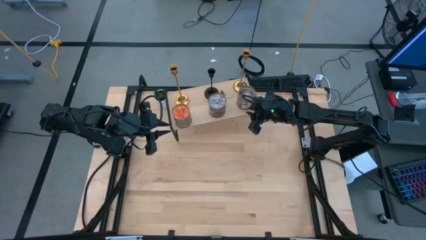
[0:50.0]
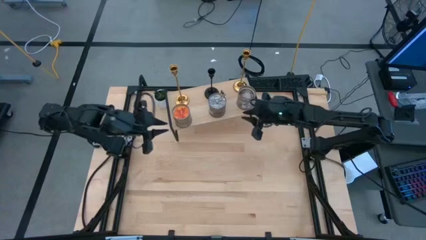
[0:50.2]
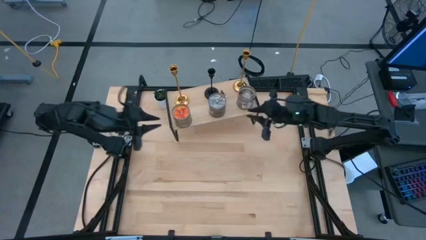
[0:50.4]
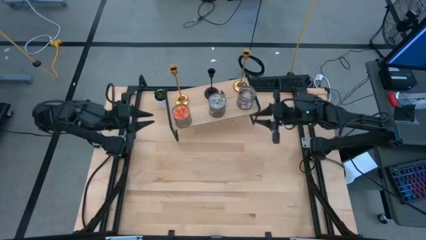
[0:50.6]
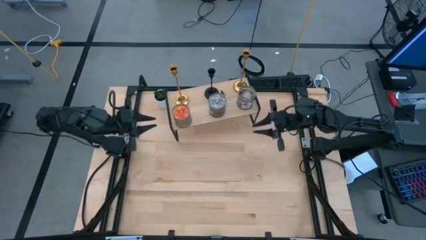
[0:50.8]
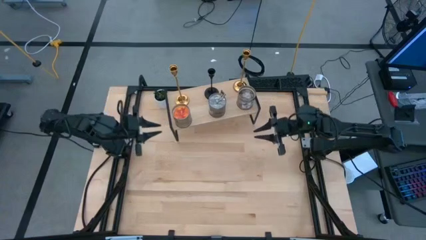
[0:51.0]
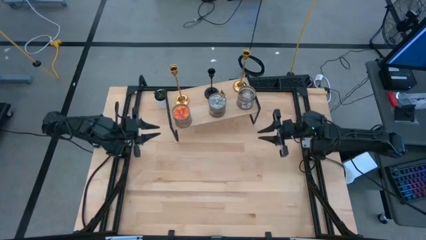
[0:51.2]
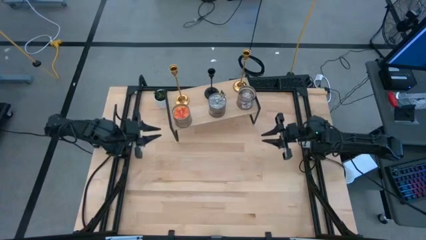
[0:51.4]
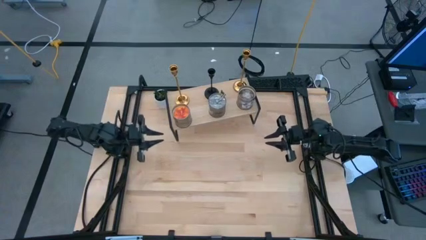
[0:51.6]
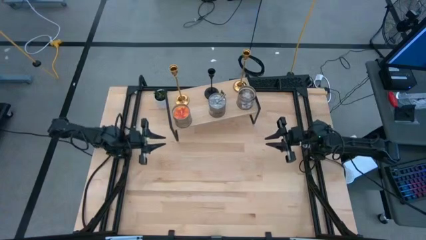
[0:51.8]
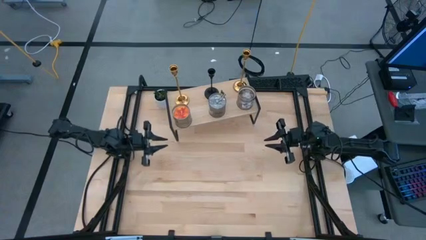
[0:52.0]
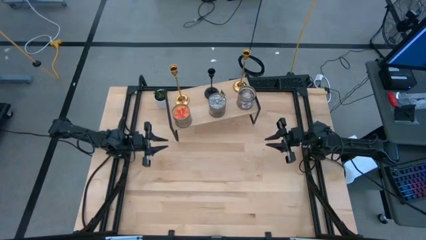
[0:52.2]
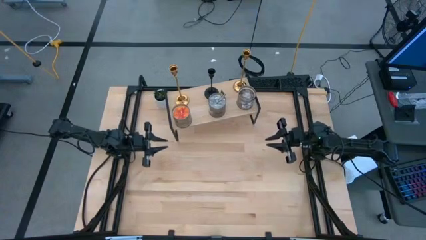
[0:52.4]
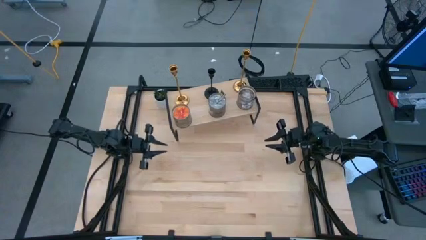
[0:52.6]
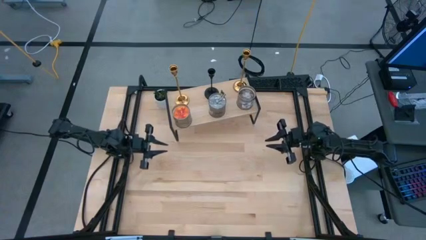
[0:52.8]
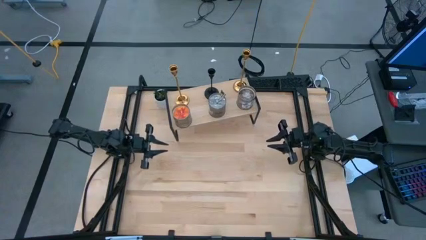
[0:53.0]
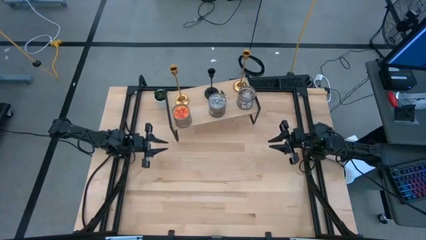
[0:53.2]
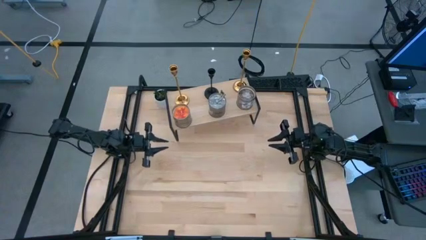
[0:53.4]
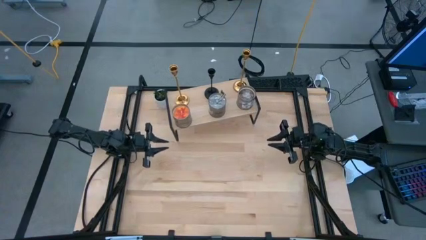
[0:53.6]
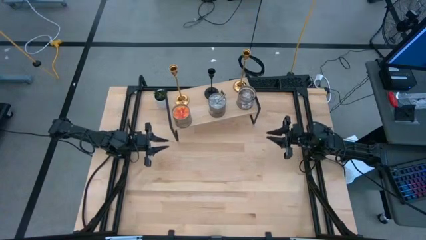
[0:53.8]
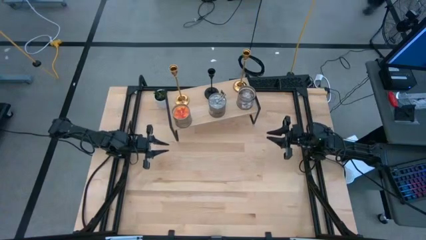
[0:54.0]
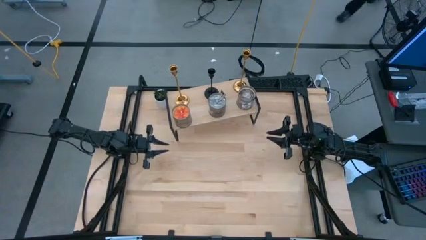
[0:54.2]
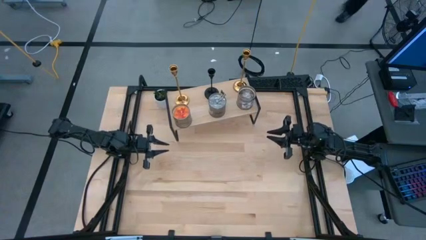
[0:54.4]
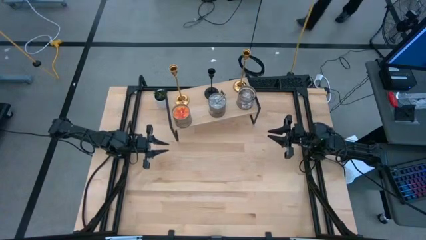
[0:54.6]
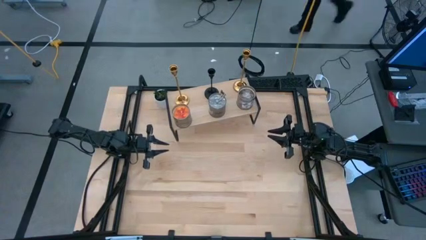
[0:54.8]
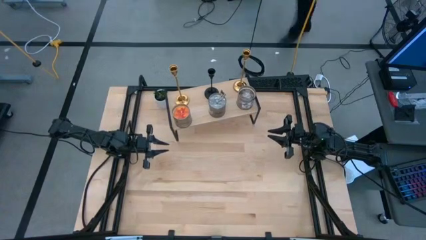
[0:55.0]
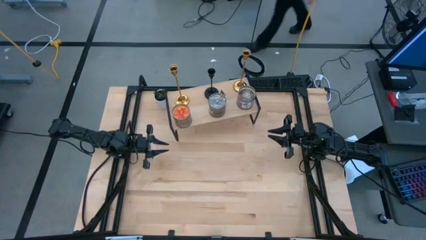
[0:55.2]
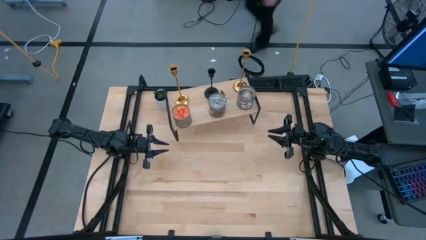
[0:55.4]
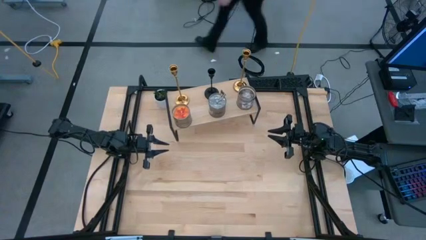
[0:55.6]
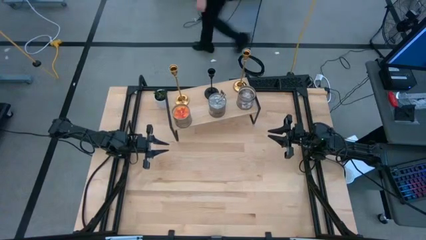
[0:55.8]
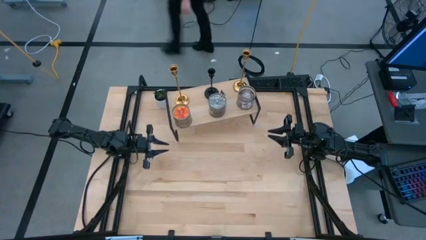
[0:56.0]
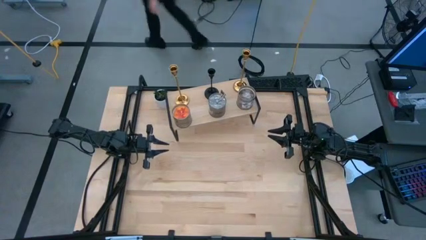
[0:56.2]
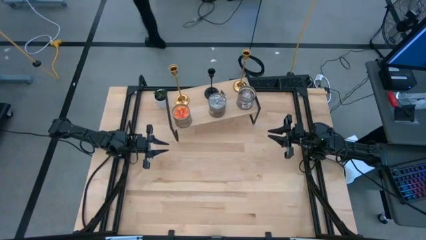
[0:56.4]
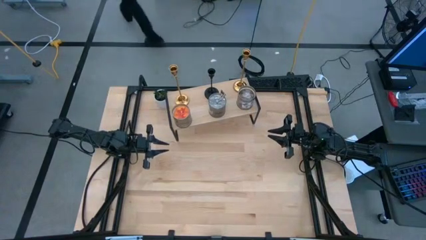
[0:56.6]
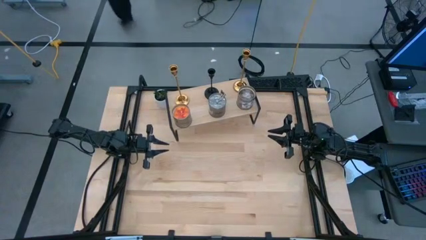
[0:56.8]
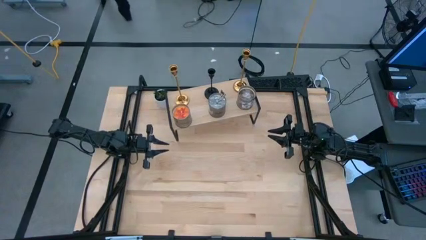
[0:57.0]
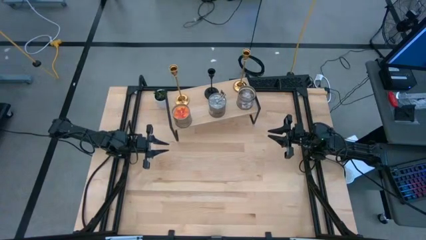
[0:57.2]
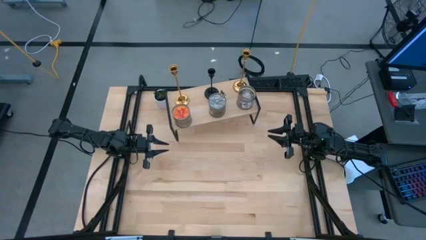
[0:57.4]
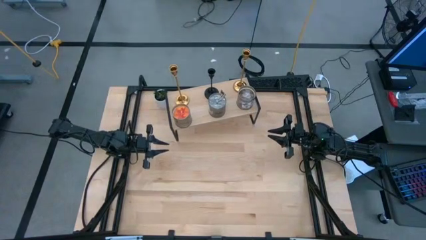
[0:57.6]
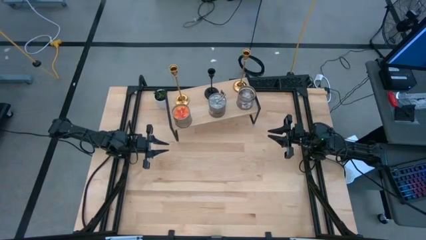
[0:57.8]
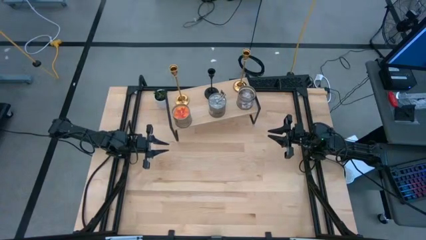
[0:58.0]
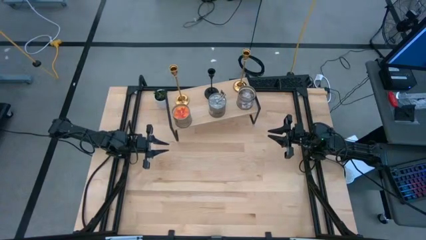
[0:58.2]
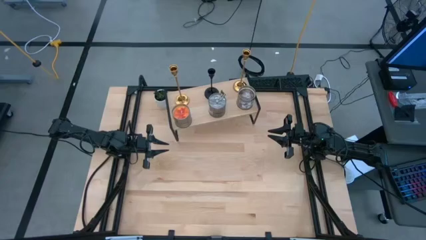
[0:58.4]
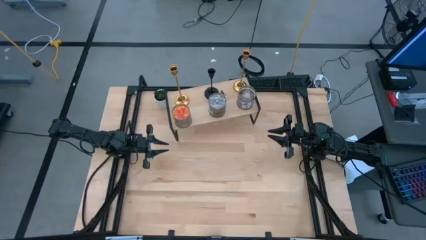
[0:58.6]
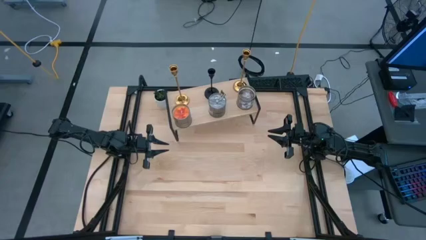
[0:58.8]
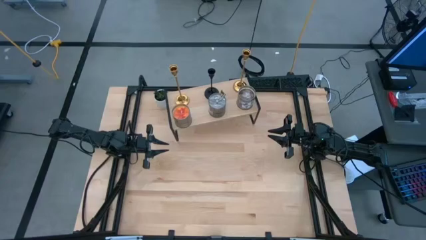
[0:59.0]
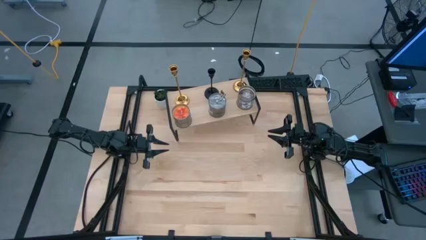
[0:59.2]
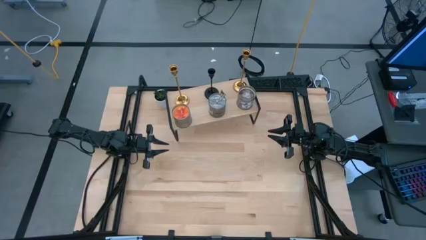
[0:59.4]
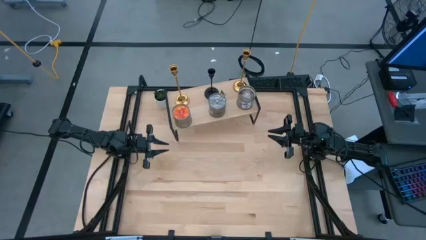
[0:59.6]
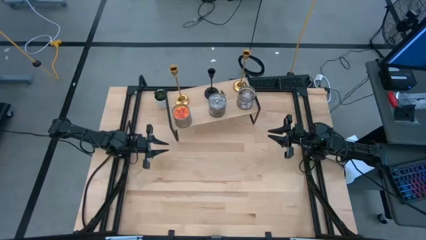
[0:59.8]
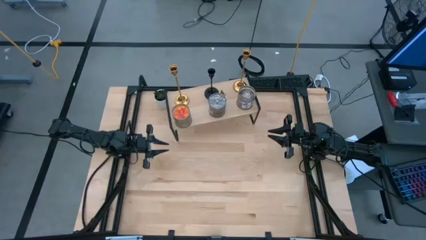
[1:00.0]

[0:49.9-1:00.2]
Task: Pick & Place candle stick holders
Return to Home Position

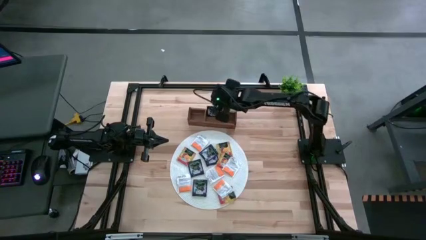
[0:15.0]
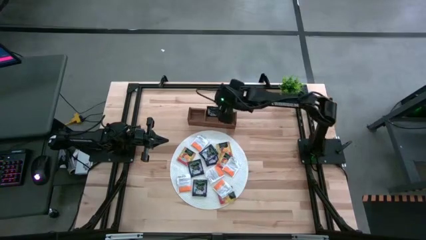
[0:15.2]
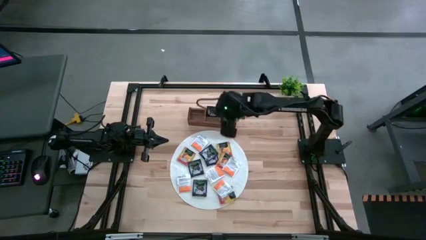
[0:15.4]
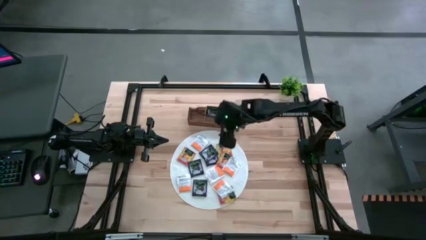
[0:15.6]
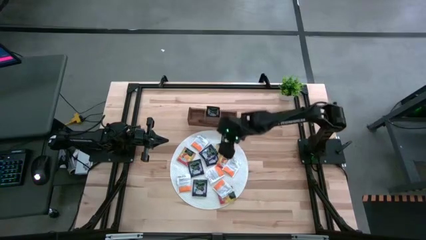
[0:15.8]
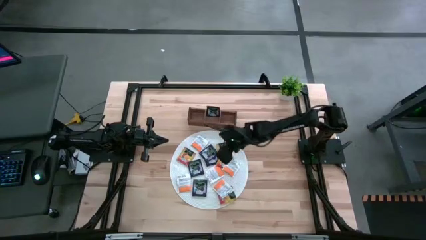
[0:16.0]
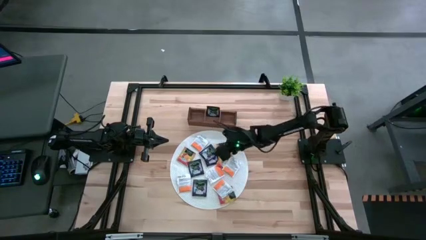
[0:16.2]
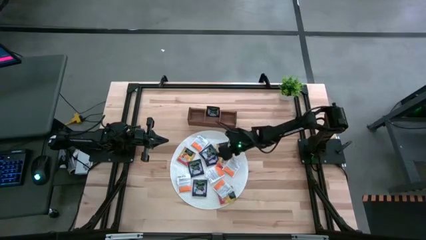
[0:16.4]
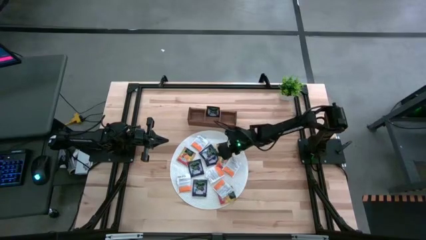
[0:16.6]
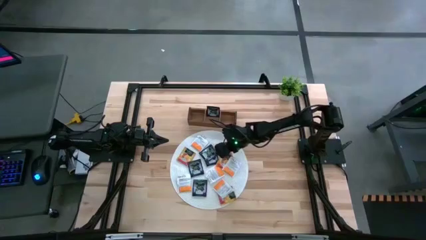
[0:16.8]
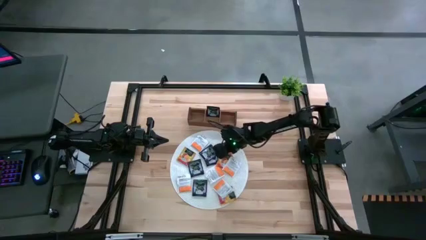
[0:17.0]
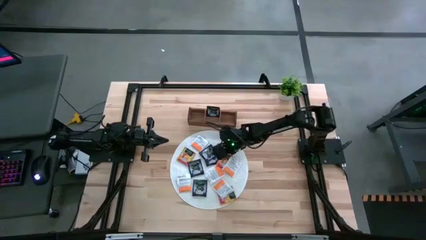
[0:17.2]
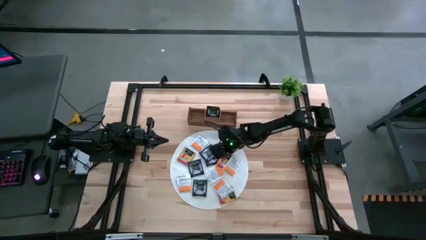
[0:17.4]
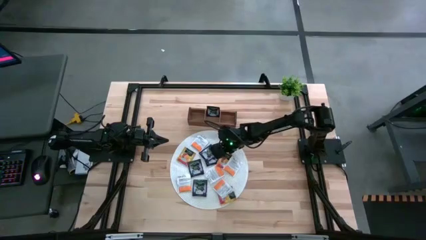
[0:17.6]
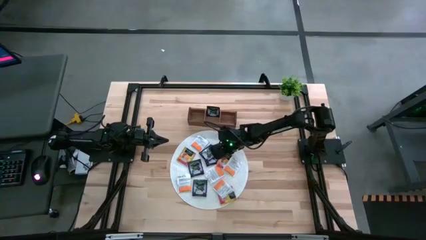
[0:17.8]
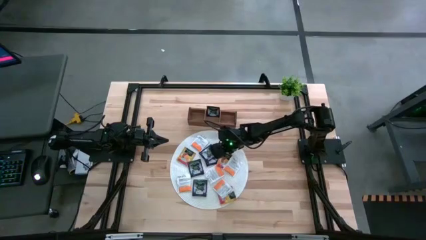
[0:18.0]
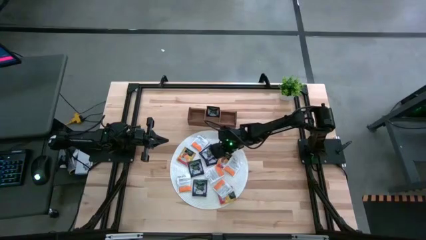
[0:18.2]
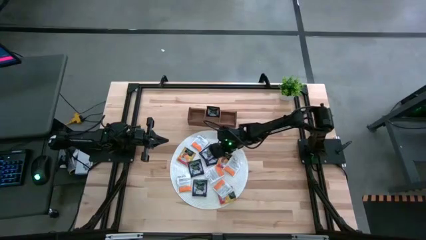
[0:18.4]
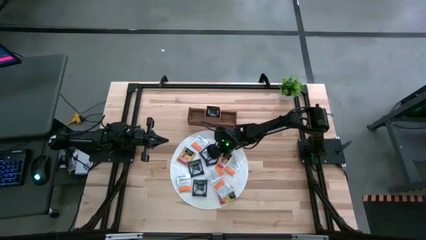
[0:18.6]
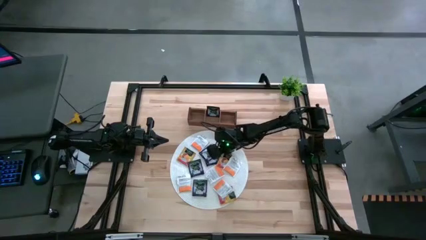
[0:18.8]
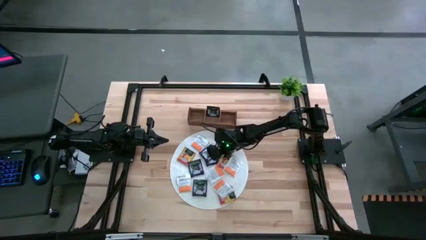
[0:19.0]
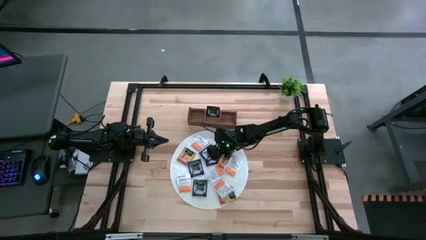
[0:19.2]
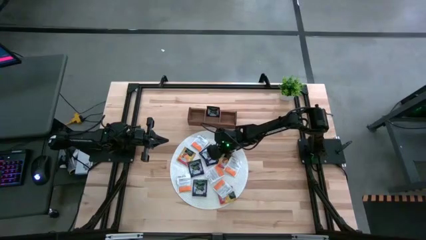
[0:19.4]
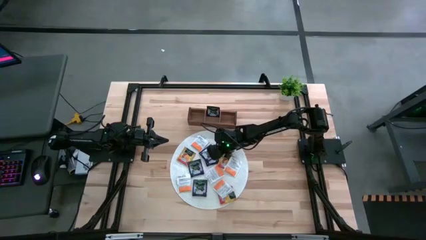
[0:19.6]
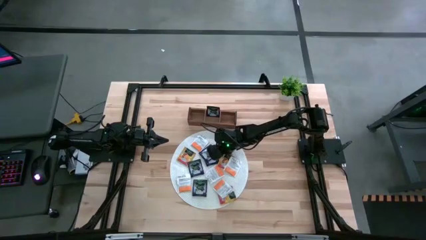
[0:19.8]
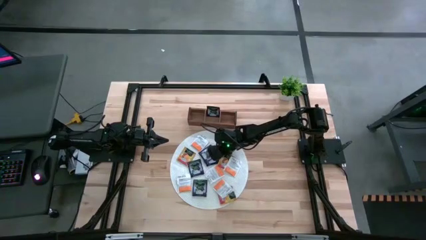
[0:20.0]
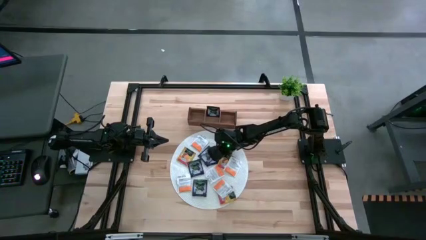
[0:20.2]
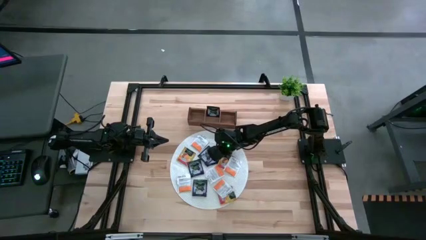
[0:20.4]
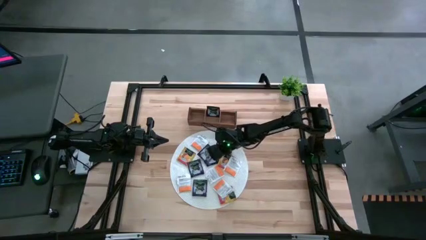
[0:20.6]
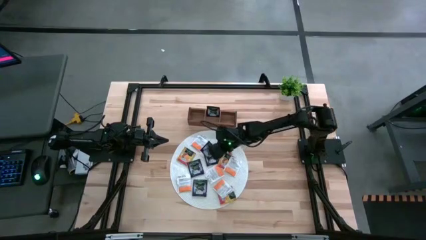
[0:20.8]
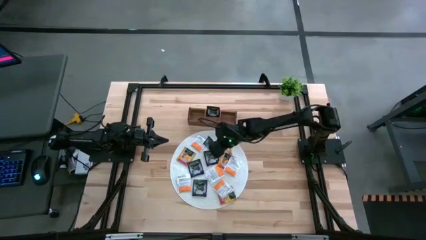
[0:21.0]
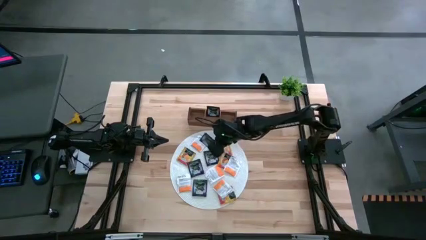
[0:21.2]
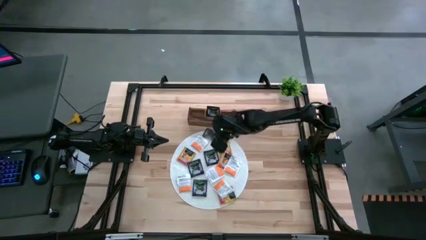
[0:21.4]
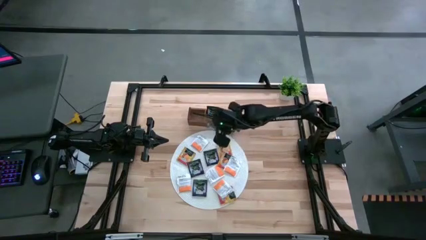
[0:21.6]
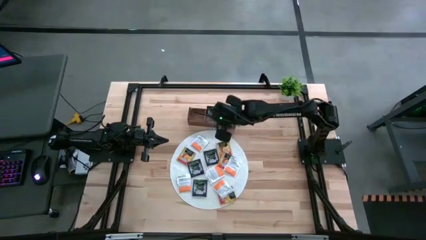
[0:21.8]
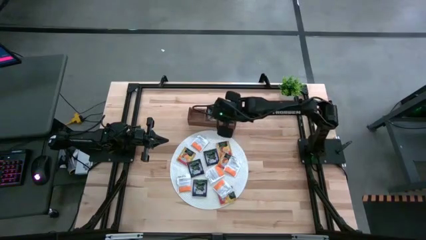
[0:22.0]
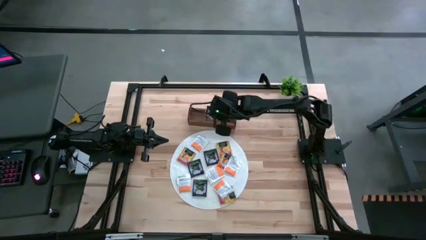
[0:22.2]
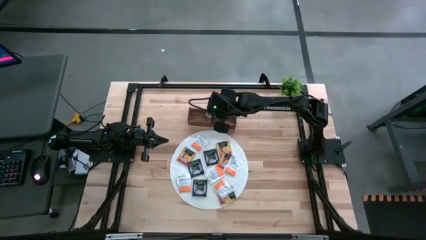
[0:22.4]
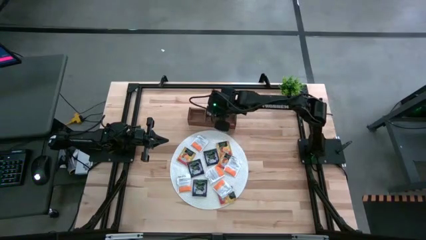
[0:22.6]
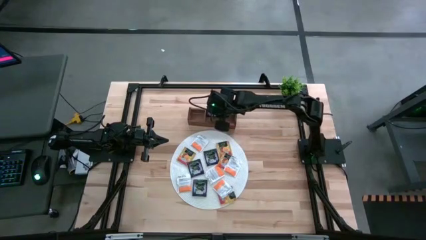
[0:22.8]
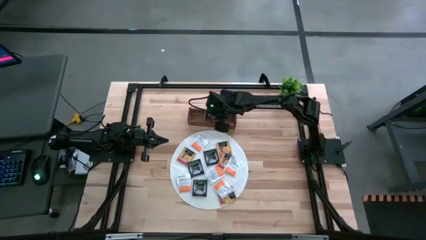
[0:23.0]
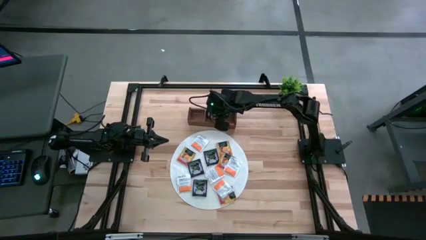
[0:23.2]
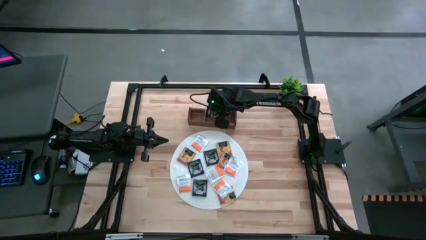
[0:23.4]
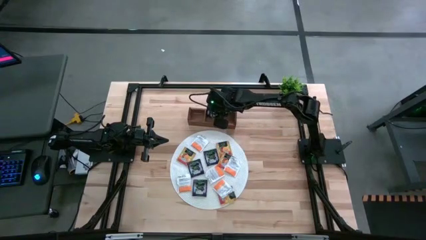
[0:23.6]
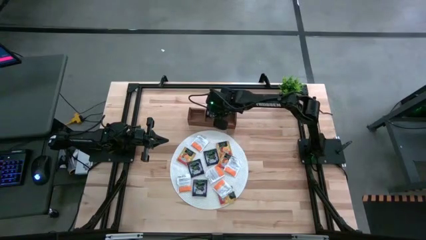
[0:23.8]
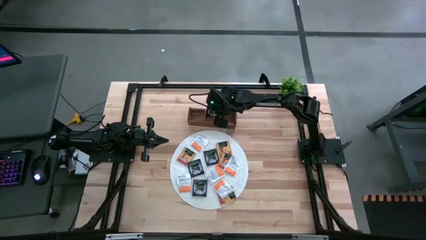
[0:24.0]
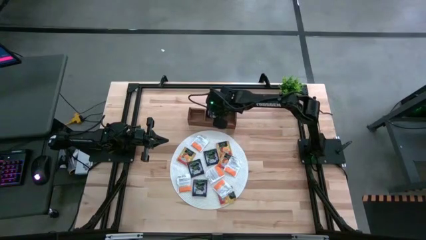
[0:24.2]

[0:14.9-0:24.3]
Task: Pick & Place Tea
Put the black tea bag into the middle section of the wooden organizer
